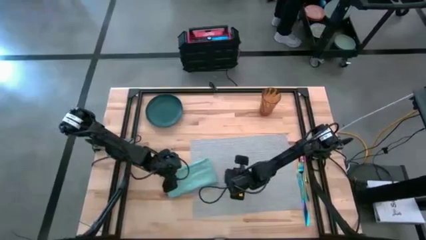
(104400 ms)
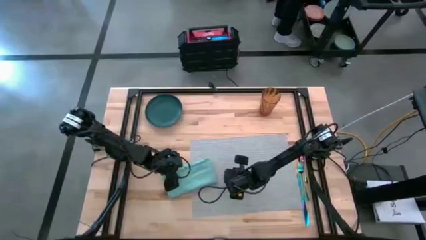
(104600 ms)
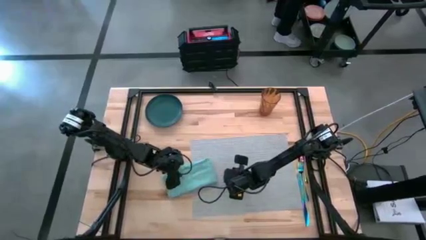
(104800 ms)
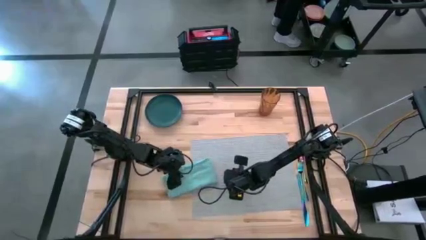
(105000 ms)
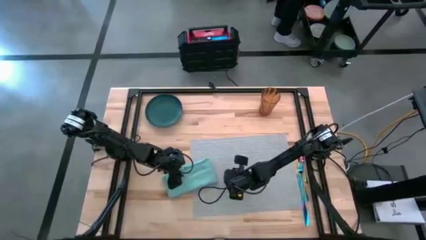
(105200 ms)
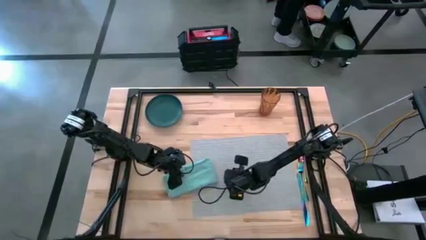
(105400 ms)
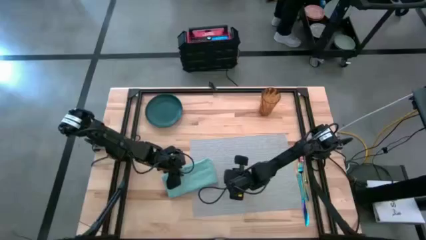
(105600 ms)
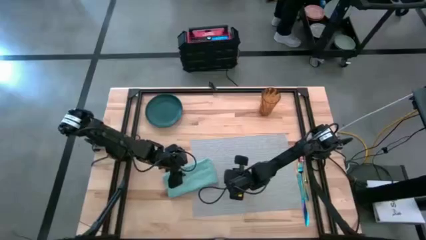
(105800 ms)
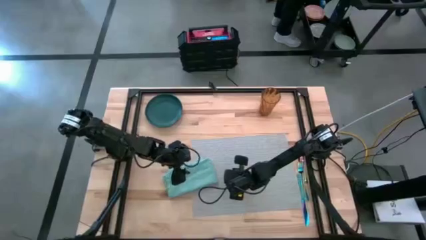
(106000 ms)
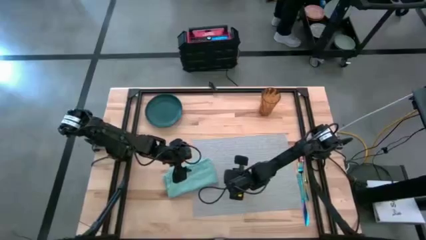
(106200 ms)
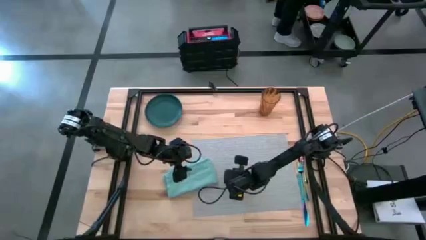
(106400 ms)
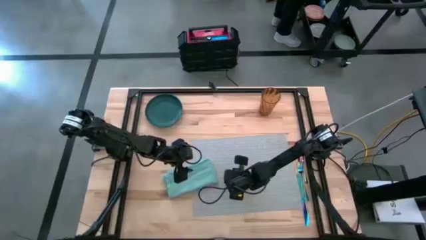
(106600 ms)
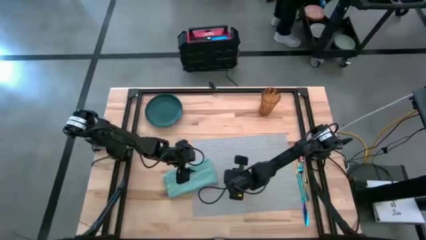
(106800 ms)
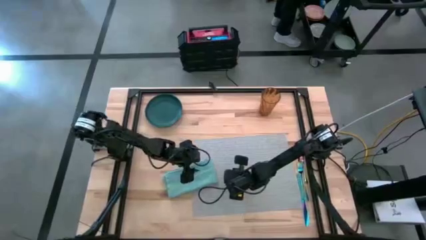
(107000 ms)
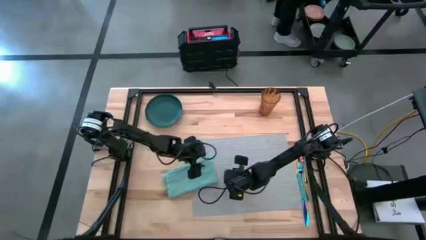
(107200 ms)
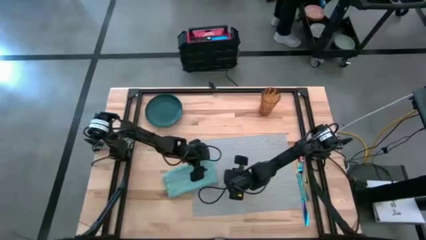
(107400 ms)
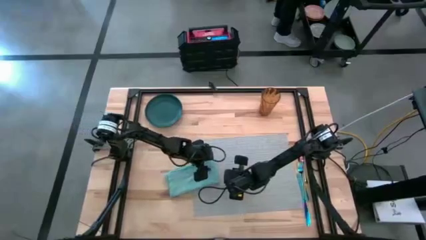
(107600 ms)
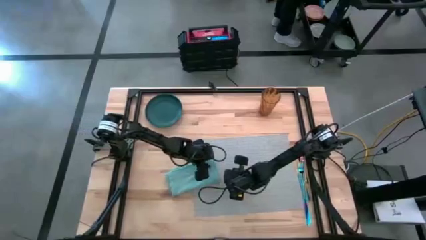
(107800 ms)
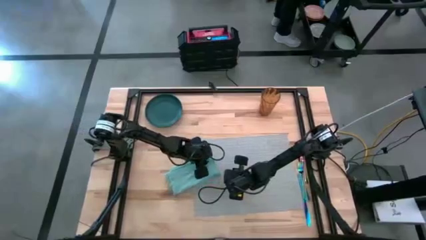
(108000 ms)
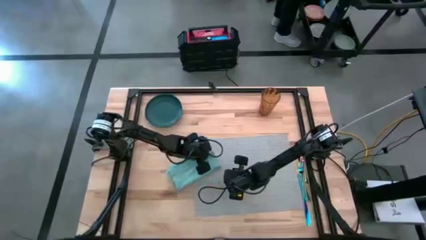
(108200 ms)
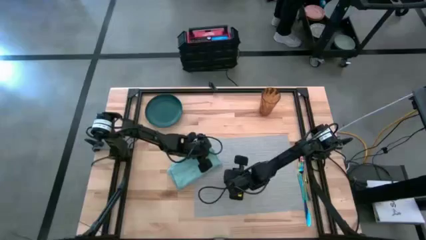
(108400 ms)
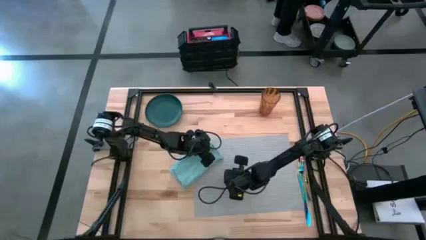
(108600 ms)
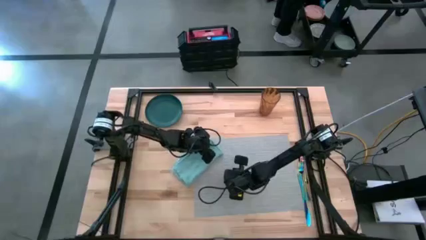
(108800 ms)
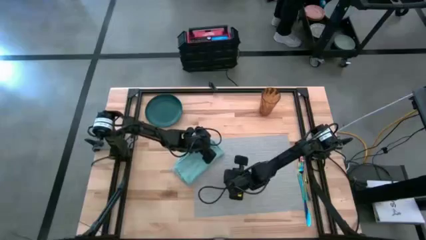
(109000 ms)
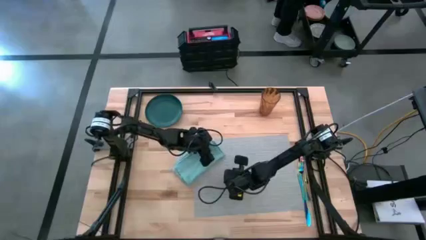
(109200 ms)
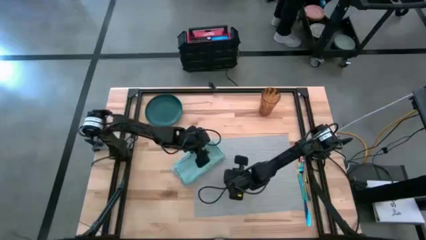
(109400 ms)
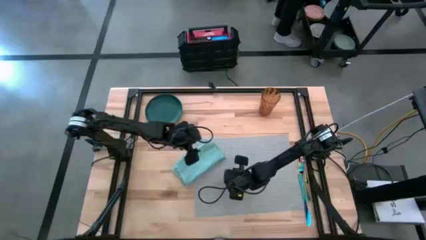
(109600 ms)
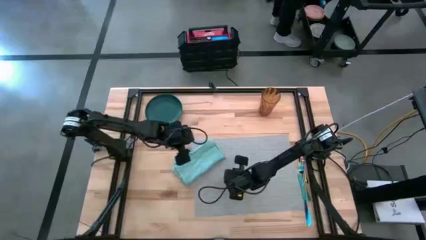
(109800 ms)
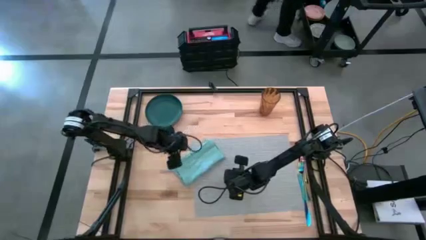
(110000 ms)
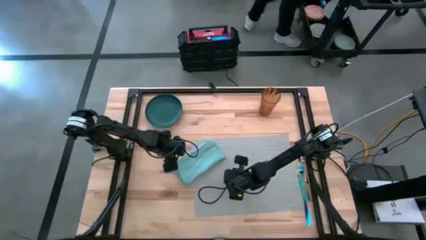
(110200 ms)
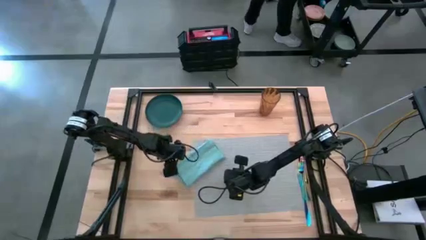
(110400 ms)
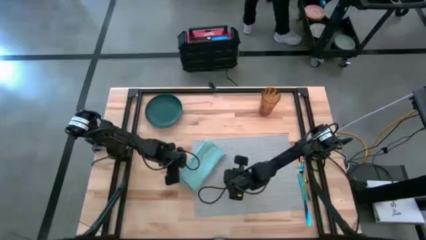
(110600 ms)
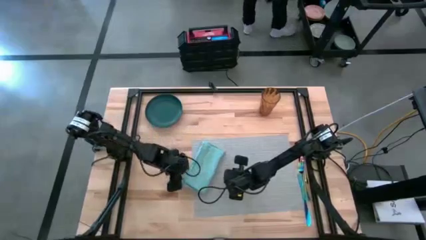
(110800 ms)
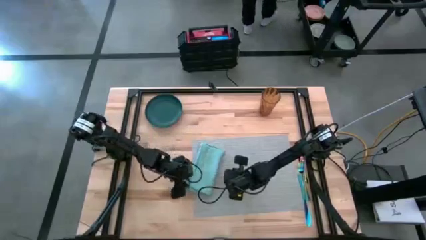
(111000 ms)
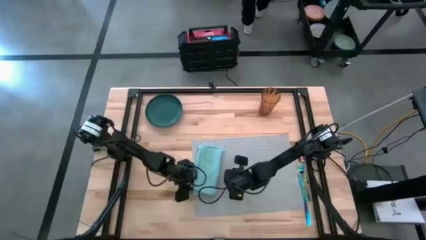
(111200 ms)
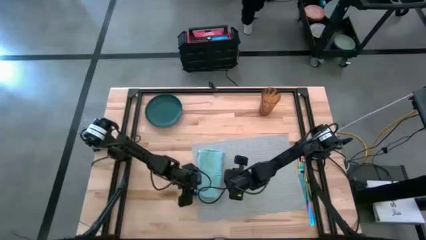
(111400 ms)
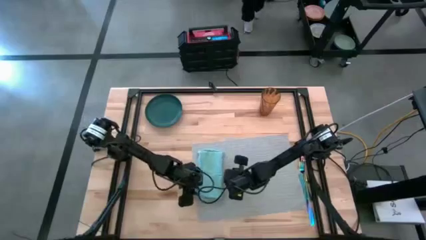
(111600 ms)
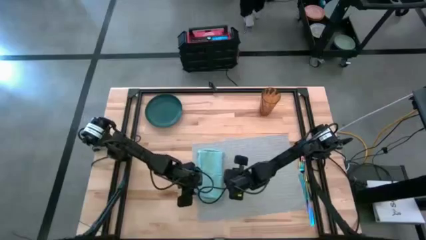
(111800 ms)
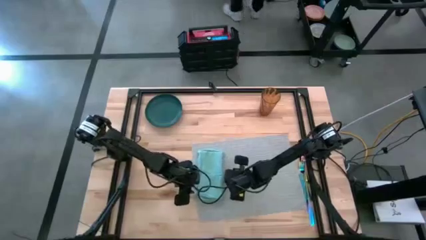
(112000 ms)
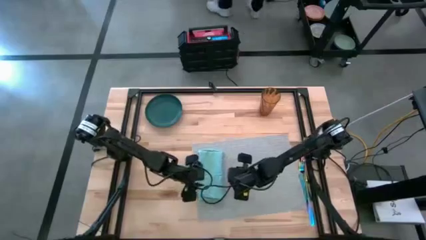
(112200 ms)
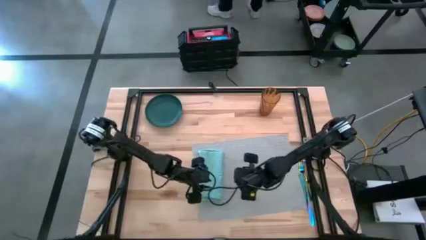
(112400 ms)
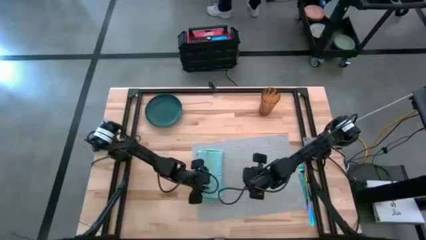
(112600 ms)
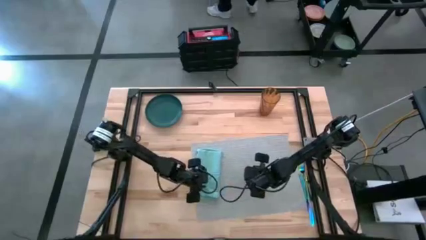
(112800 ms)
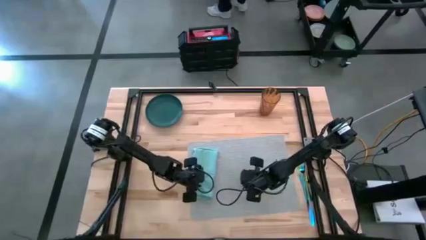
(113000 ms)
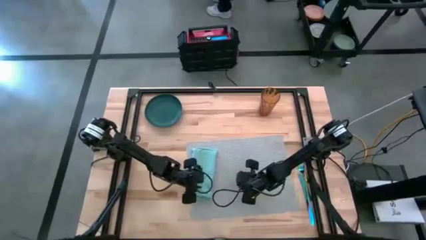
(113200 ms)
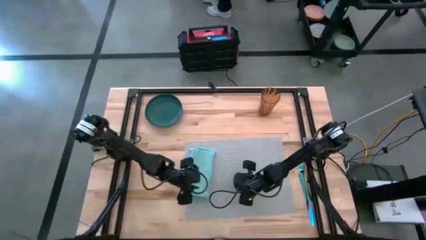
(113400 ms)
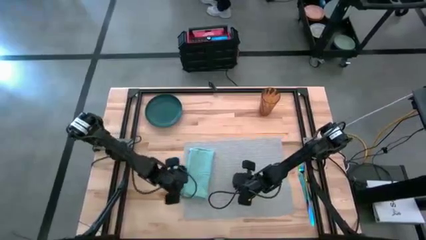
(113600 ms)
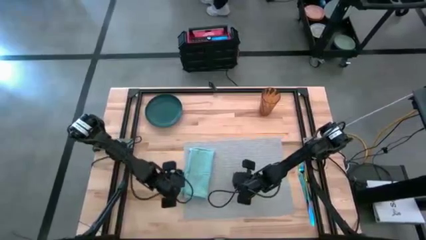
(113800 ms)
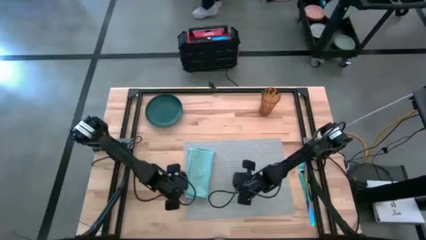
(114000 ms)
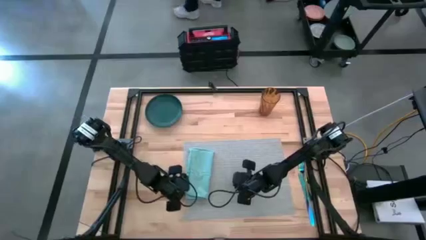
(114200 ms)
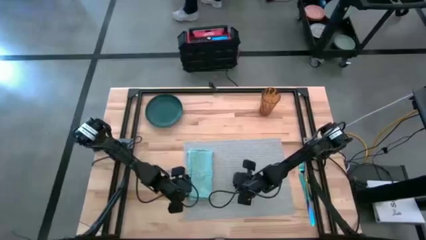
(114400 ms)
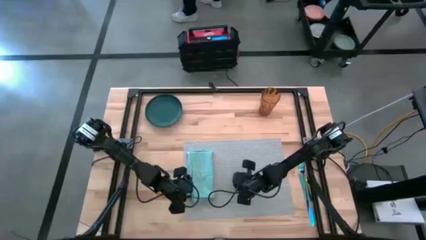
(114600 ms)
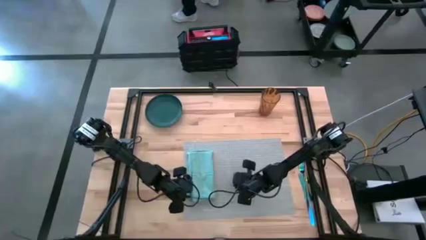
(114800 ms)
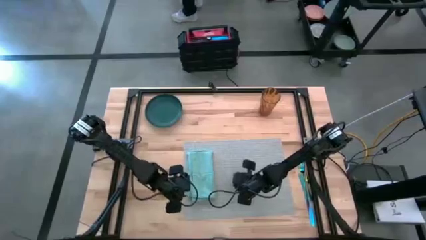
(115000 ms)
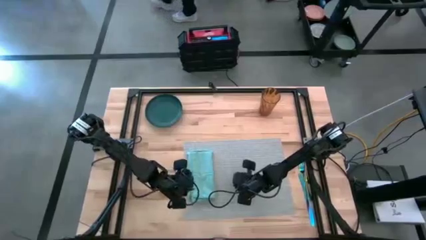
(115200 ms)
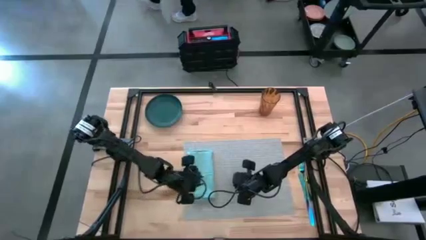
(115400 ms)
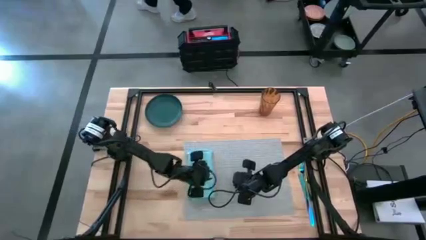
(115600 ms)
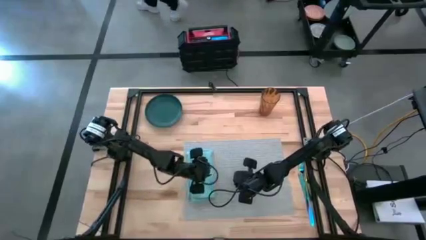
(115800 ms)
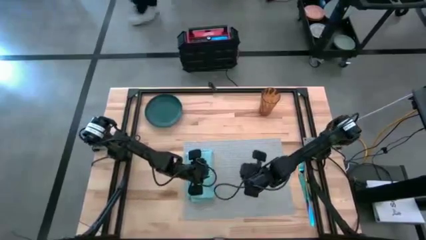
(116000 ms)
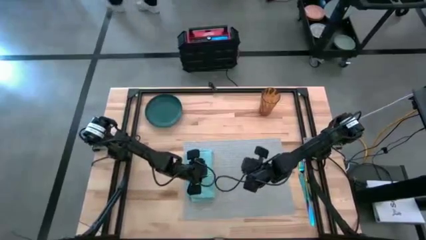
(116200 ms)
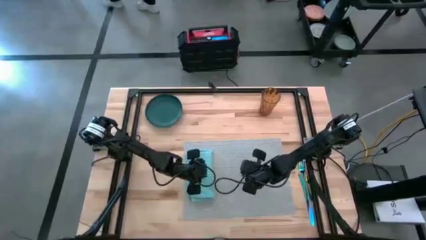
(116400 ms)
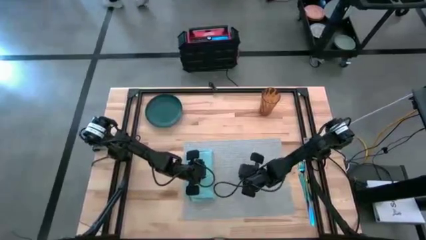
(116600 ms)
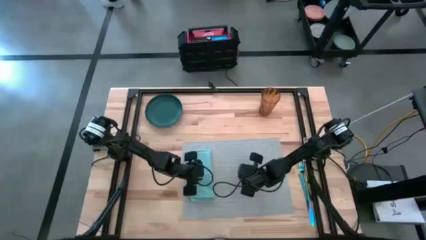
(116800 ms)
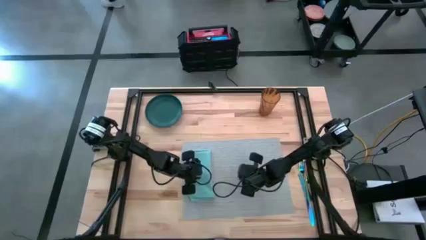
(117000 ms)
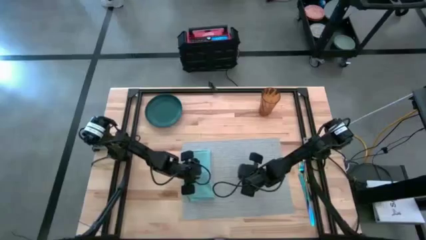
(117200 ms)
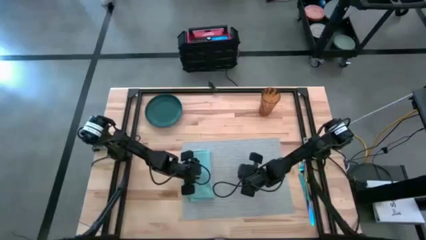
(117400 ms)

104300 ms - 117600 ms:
Task: Set table place
Put the light blue table napkin on the gray tablemat

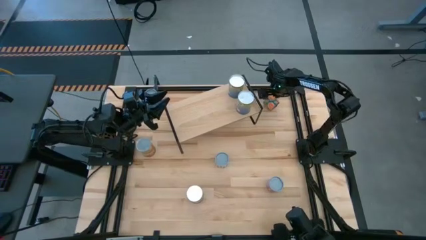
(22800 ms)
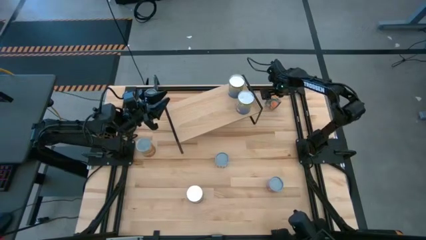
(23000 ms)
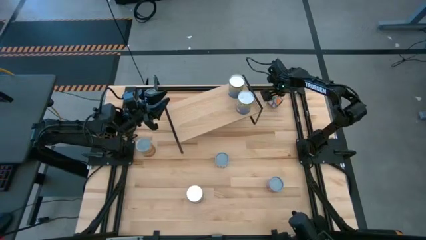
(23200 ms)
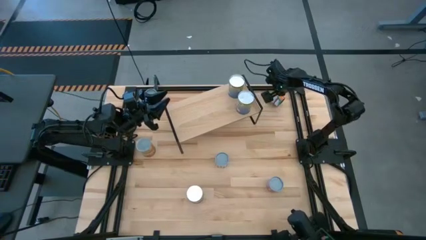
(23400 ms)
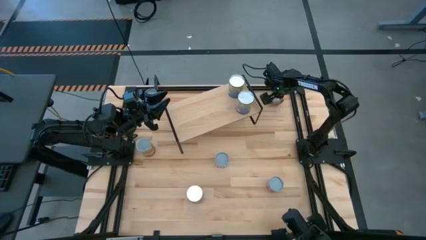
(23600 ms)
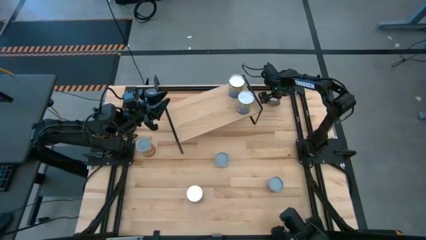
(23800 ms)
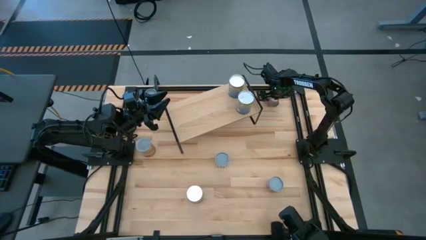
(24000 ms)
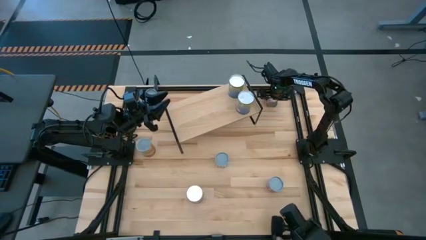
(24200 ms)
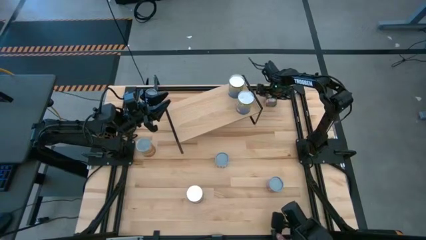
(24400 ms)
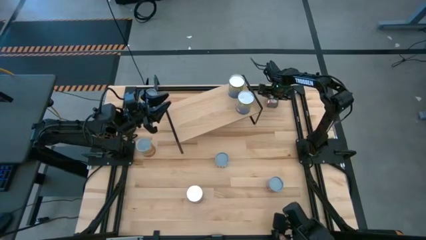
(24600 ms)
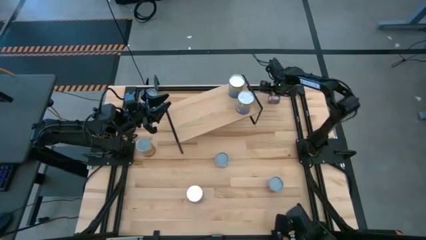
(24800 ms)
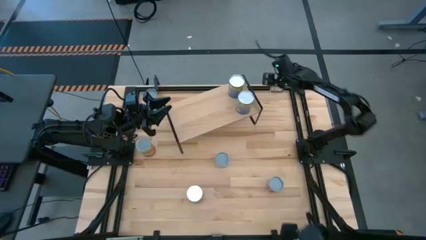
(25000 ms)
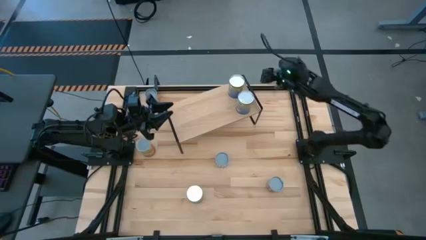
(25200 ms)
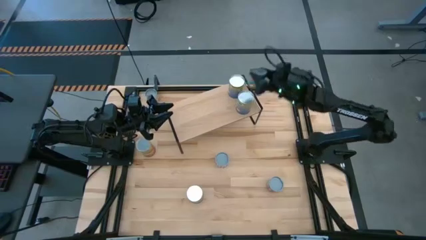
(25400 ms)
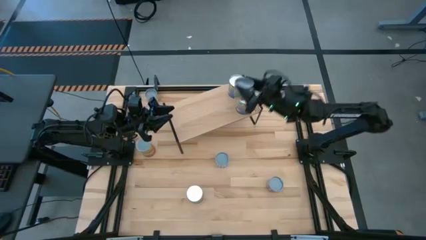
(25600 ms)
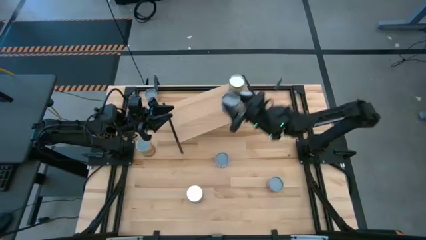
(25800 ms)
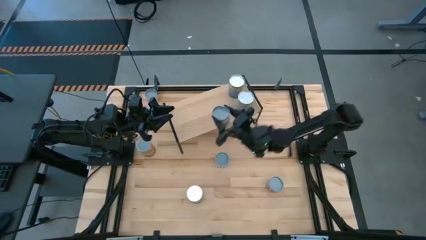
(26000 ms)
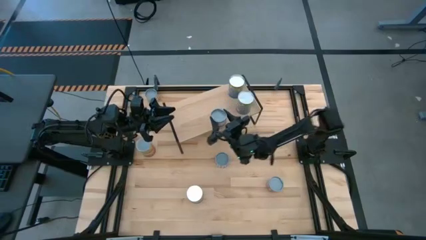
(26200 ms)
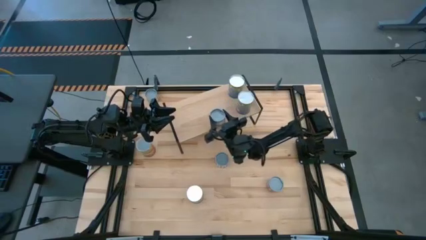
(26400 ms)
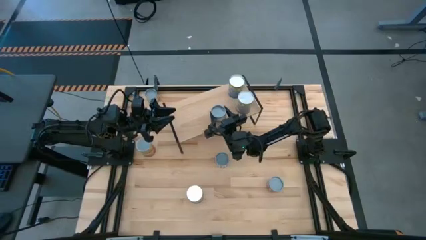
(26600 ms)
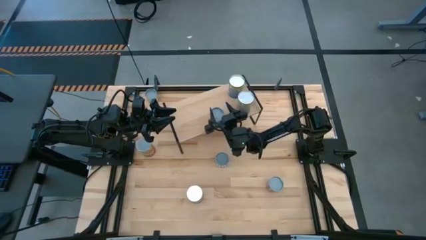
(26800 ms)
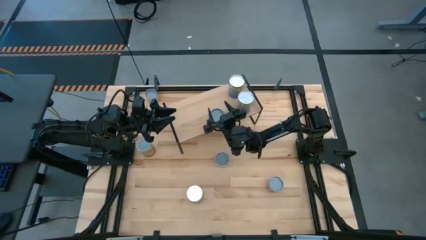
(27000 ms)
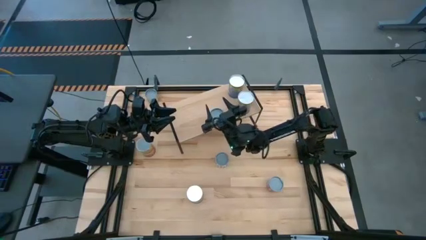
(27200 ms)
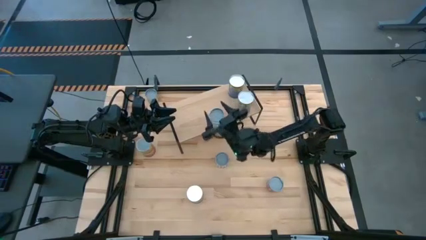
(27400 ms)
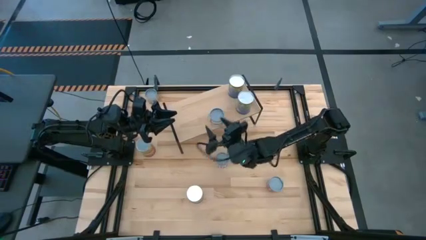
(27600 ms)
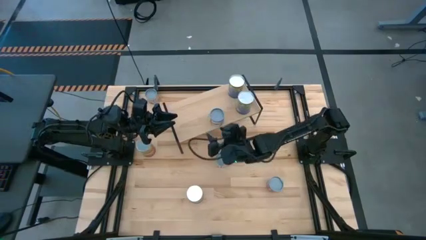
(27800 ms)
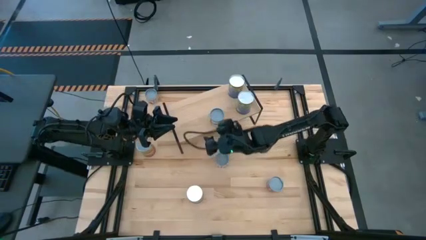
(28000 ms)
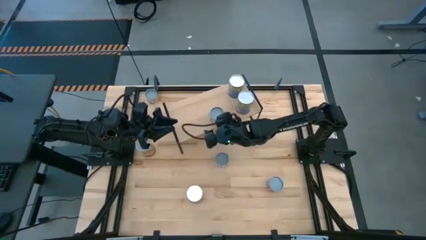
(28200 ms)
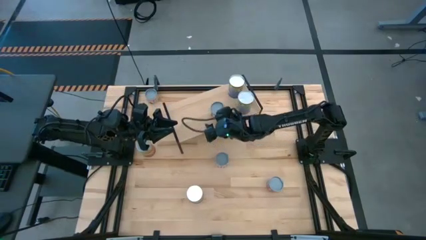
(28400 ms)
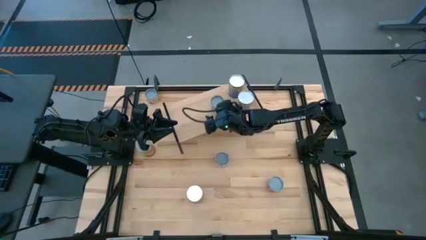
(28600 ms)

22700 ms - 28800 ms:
Task: Pick and place cans onto a shelf
Put the canned oranges on the shelf
